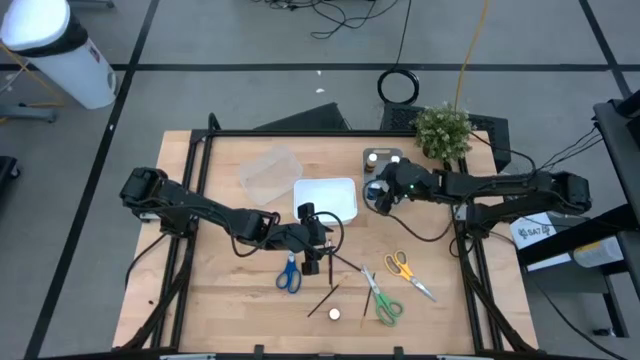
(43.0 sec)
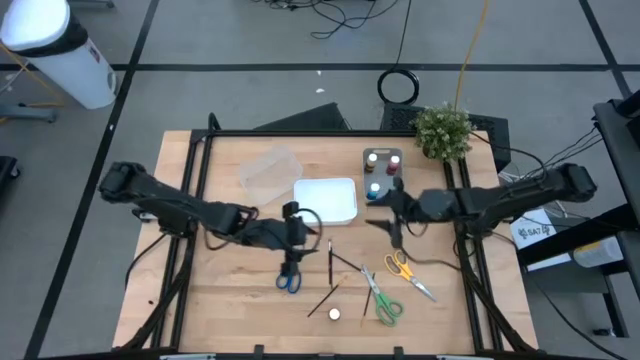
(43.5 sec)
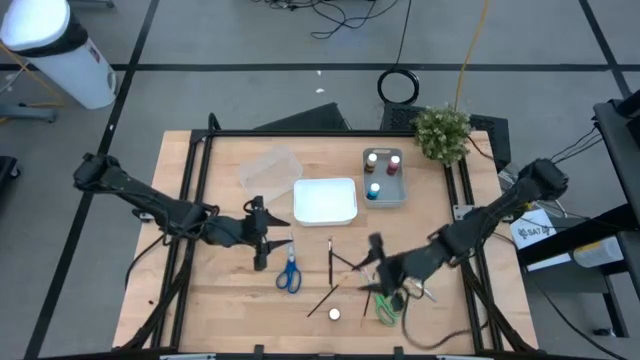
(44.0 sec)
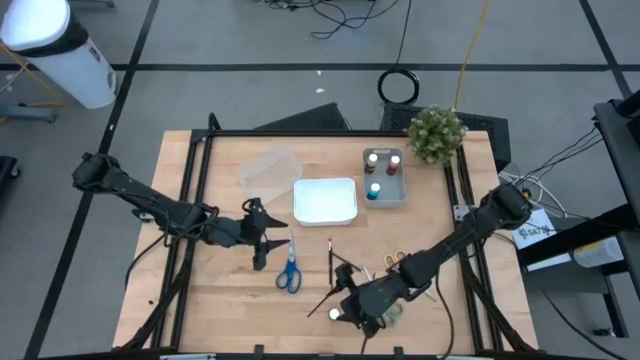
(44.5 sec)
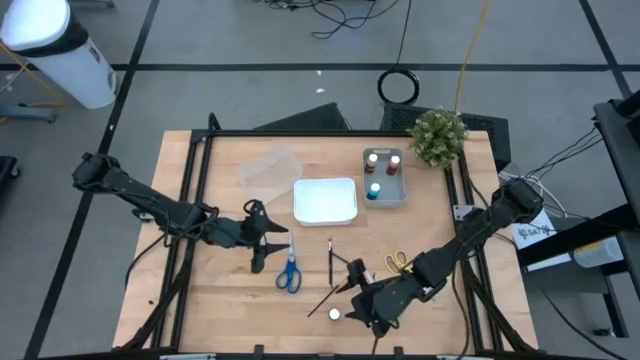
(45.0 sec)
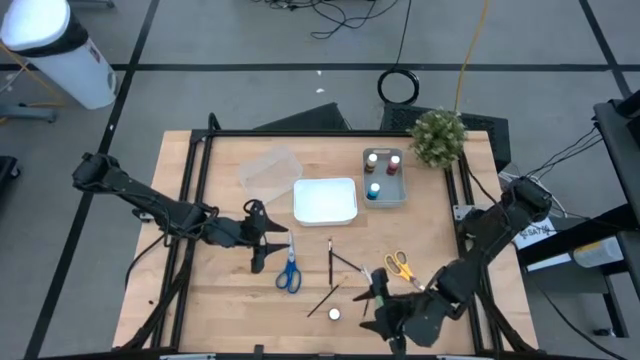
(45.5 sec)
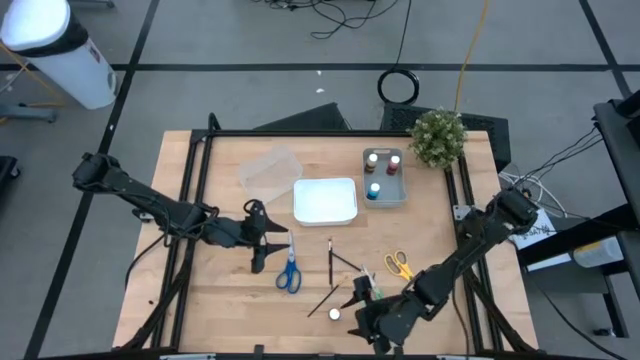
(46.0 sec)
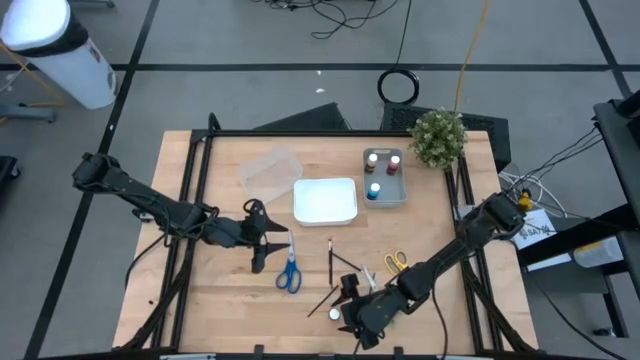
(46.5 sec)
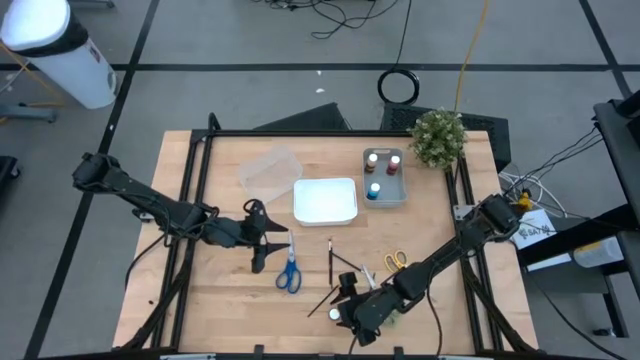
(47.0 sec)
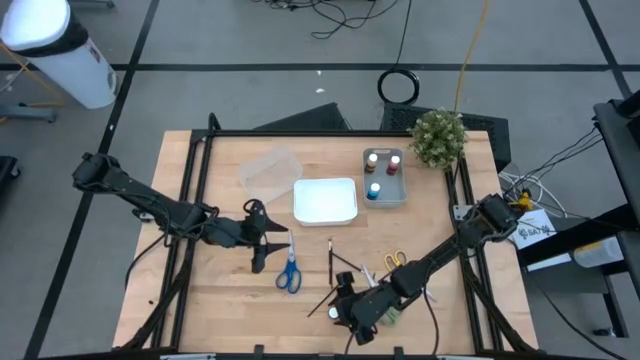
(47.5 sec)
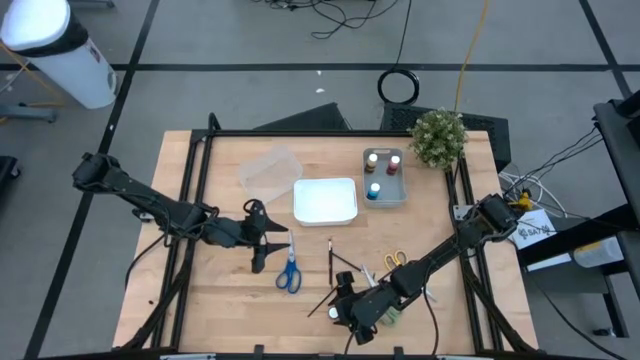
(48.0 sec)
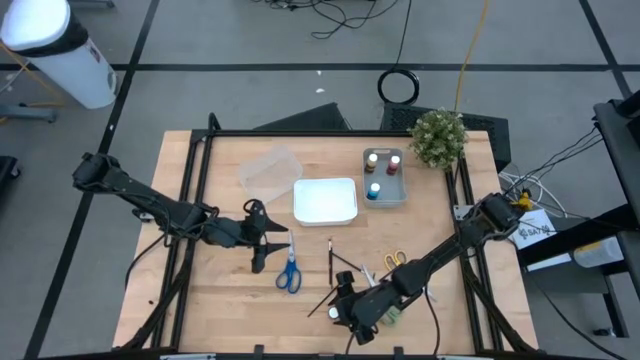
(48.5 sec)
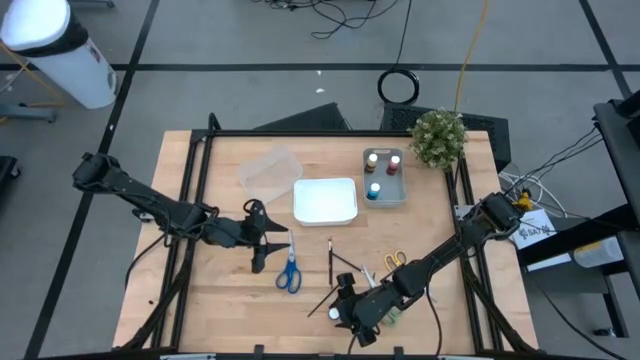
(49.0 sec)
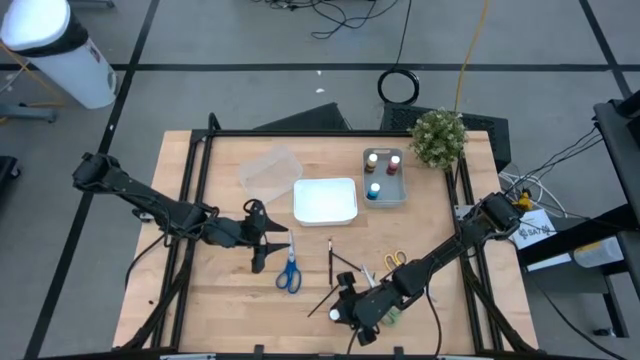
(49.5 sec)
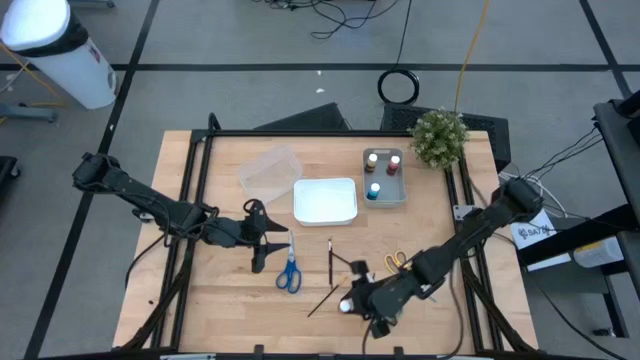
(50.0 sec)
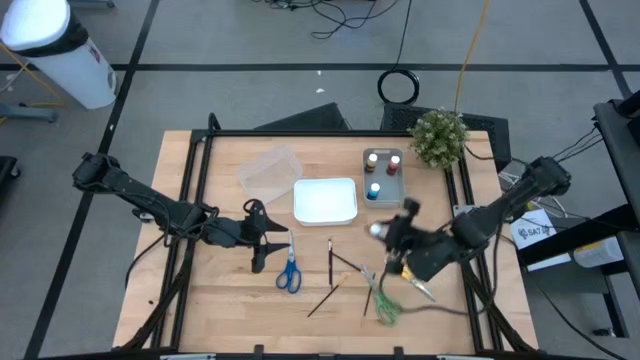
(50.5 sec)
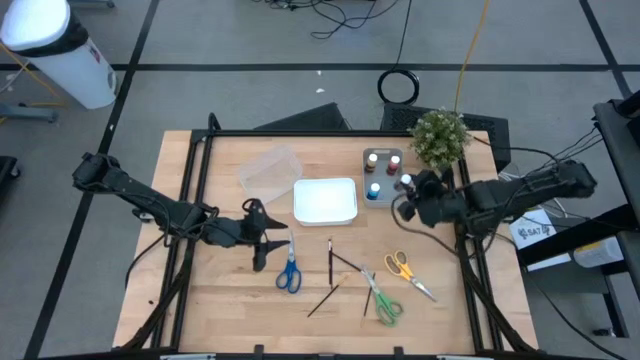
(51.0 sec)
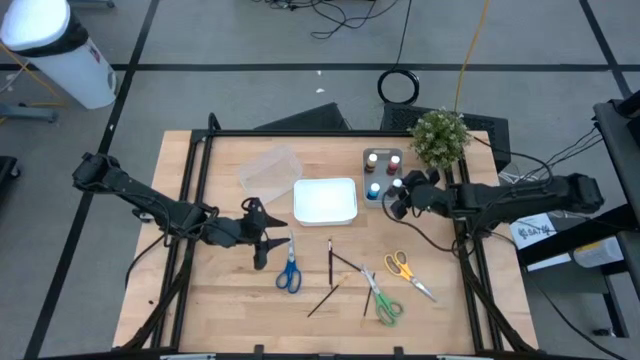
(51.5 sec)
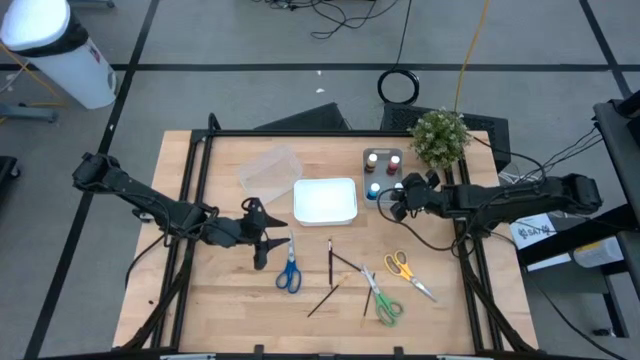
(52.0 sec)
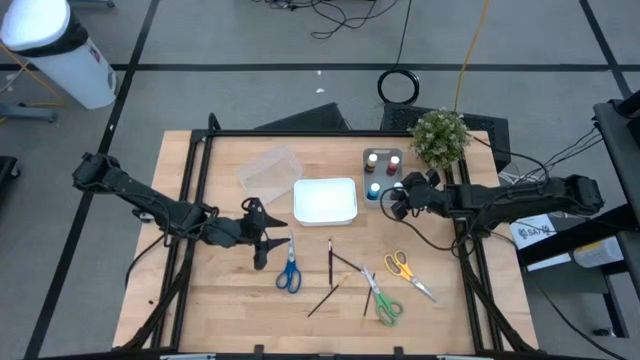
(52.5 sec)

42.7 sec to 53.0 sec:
Task: Pick & Place Paint Supplies
Put the orange paint bottle in the gray bin

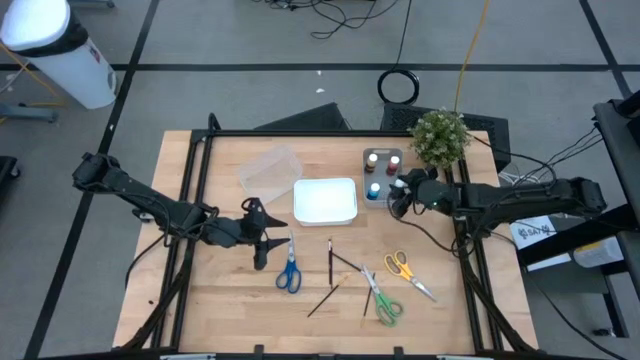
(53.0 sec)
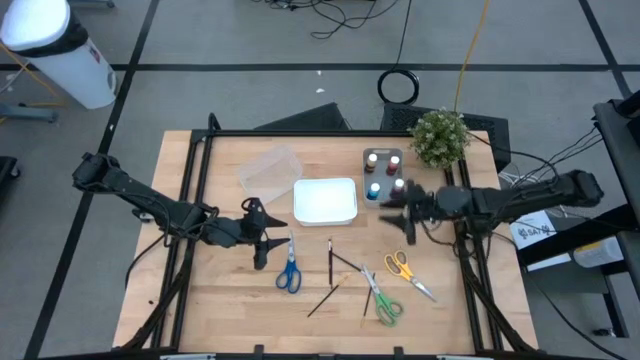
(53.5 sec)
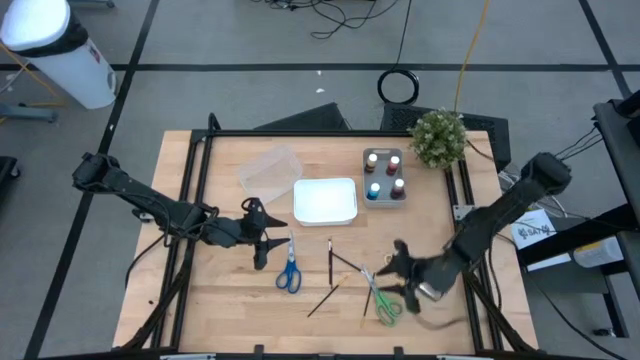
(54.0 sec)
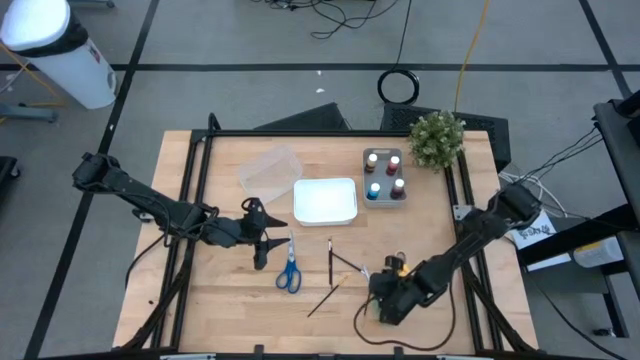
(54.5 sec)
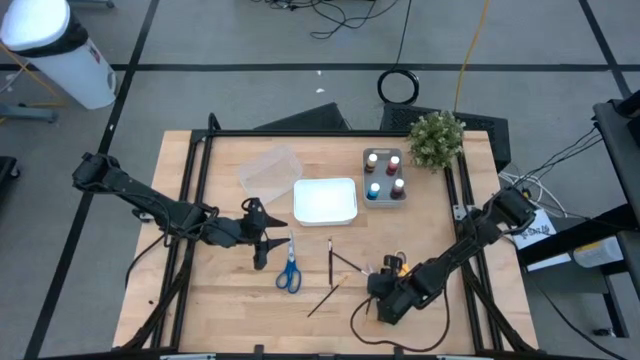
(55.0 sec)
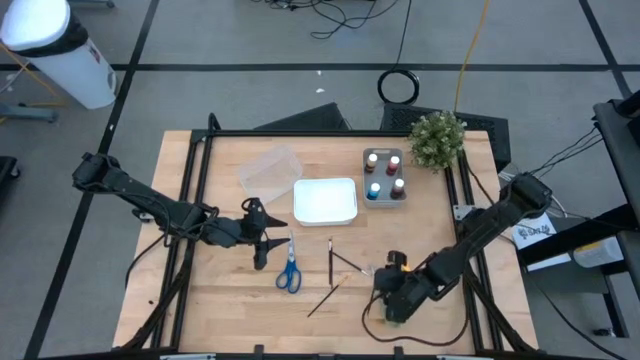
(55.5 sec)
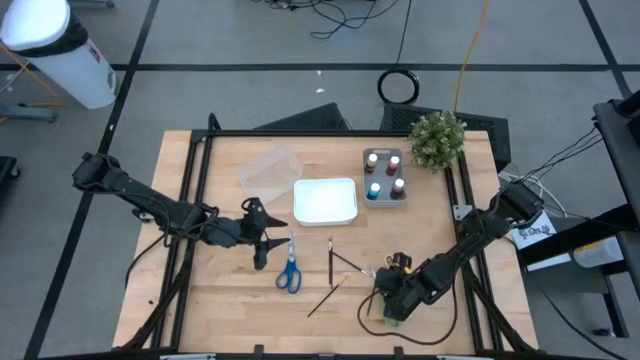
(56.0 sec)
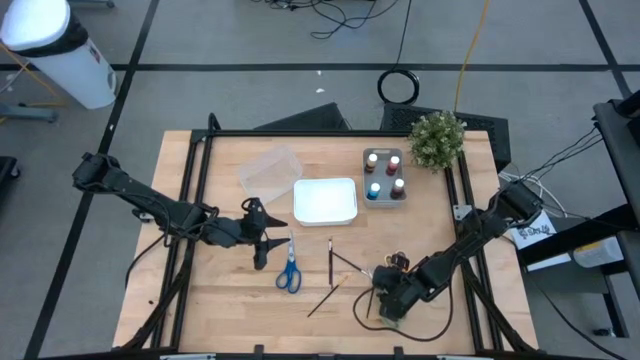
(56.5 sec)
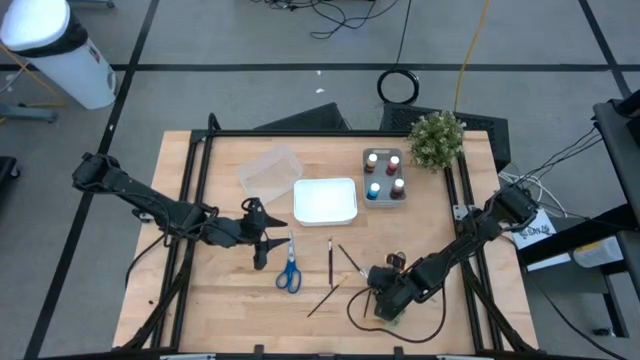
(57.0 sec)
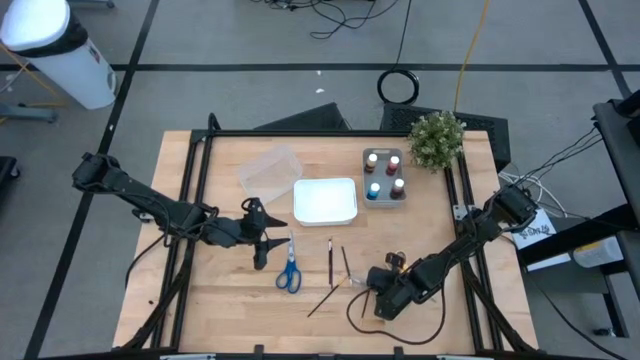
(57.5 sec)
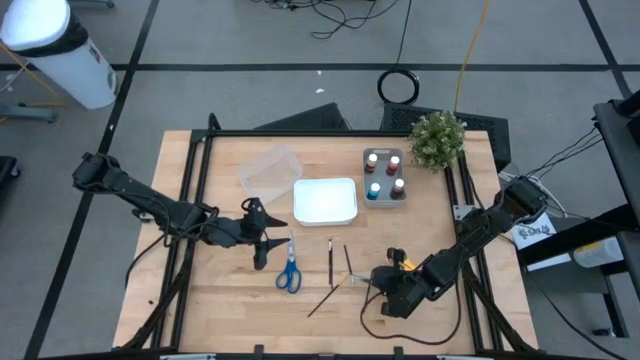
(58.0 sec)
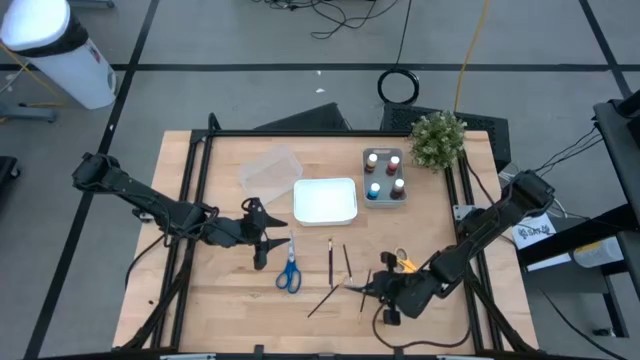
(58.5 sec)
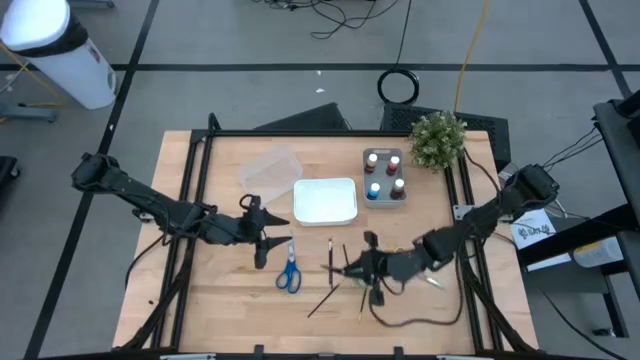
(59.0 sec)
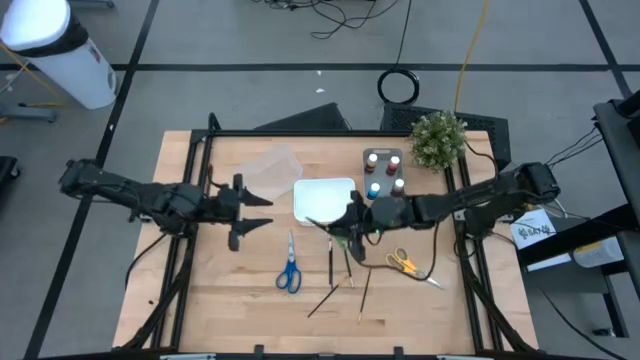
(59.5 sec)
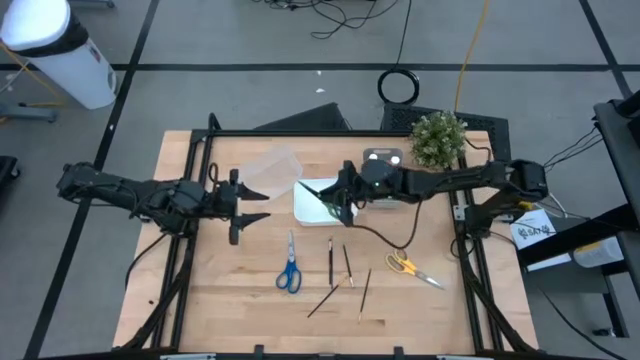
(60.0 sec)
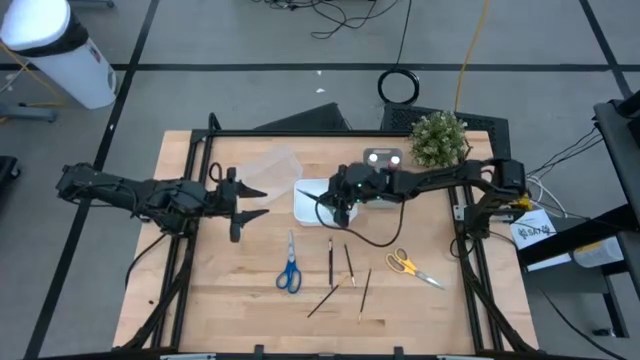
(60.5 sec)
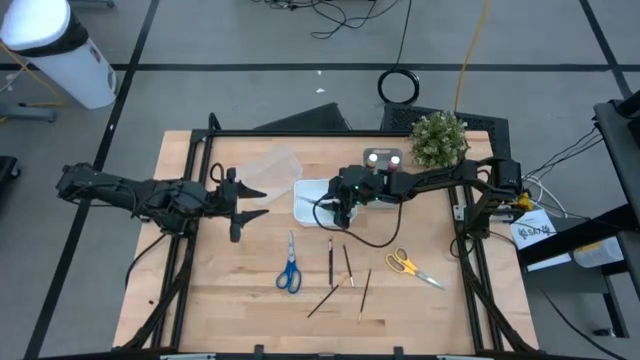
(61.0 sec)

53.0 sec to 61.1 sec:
Put the green scissors in the white bin

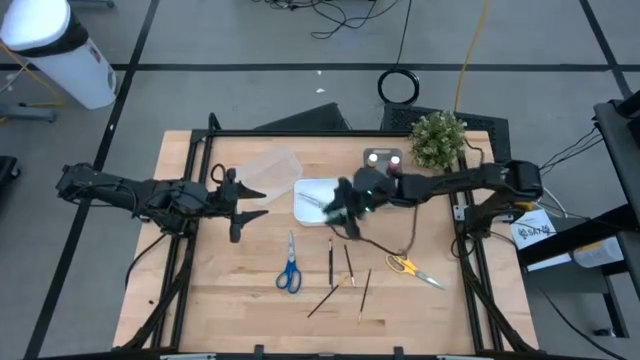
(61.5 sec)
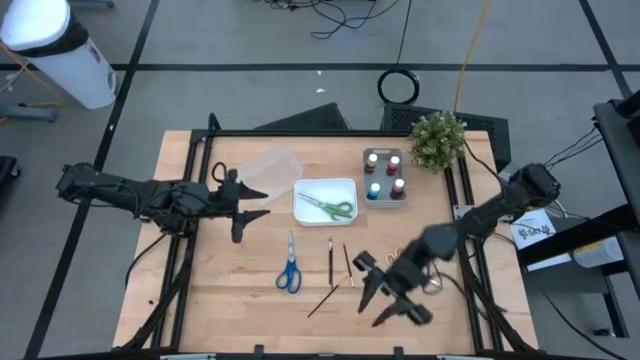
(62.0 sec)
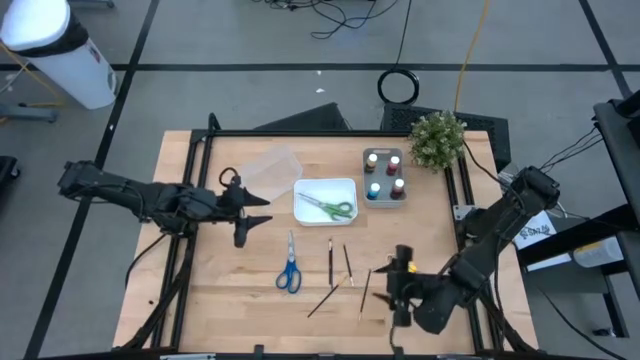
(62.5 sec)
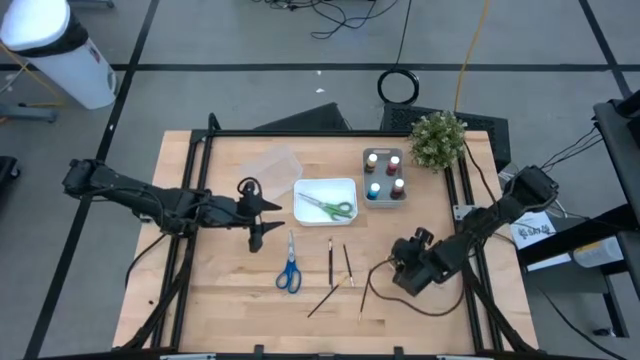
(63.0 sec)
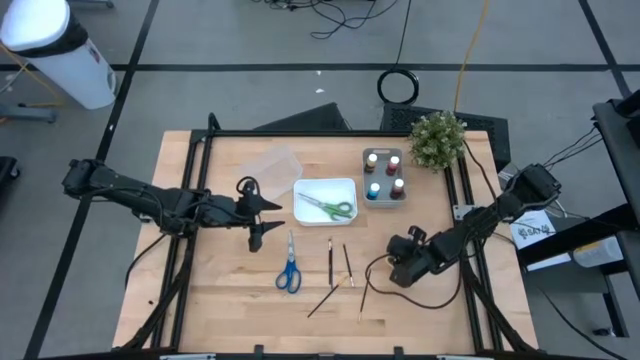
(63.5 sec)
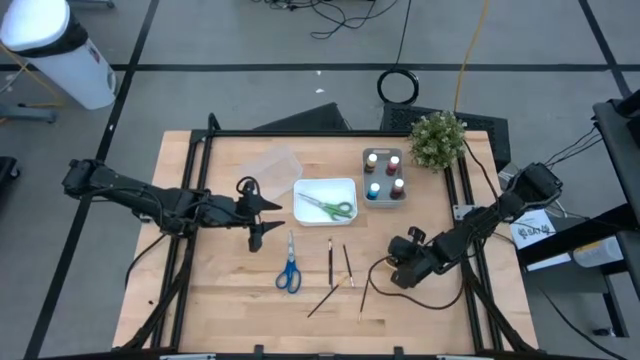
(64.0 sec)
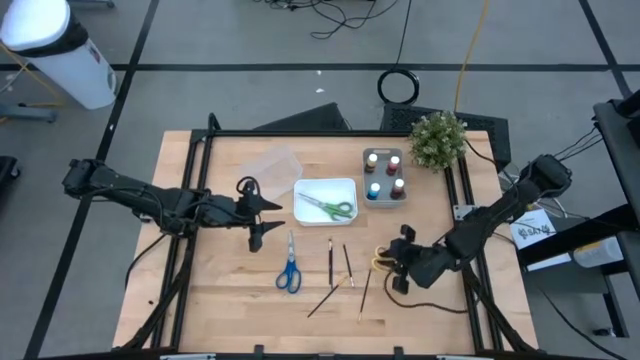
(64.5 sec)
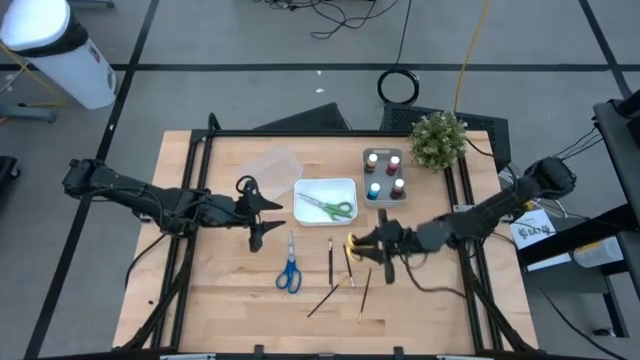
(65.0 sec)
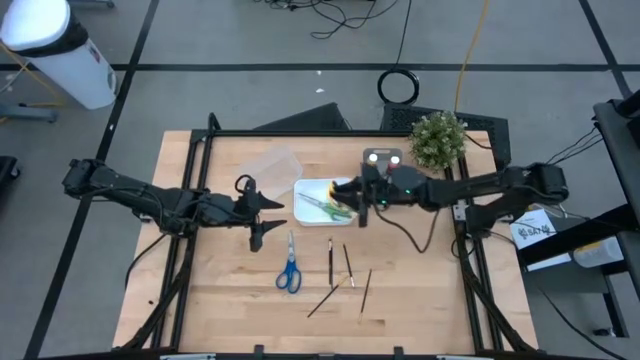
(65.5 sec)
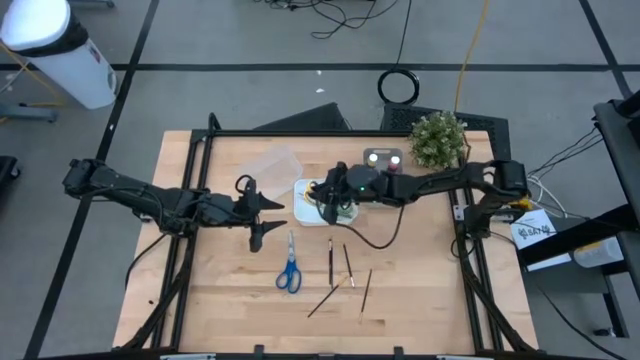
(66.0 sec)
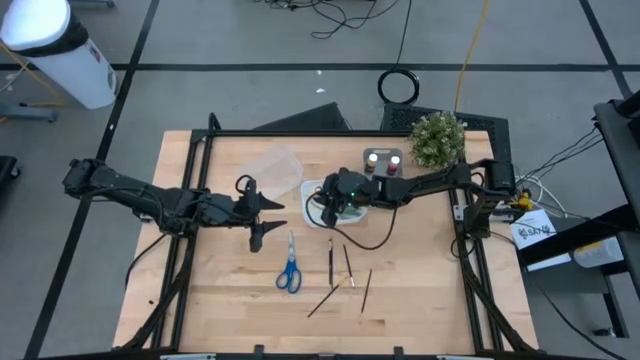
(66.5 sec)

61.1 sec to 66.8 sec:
Put the yellow scissors in the white bin
